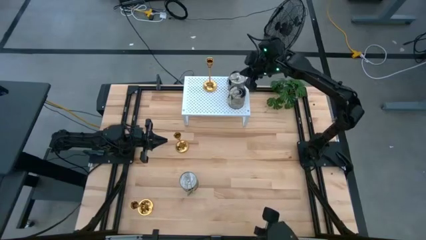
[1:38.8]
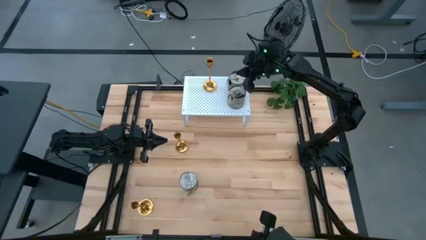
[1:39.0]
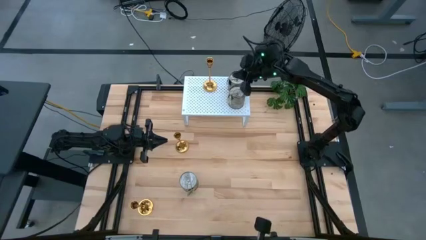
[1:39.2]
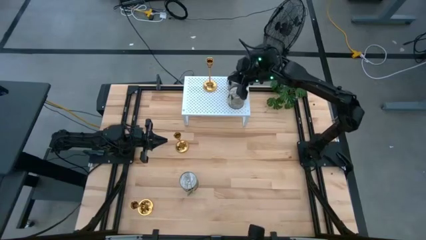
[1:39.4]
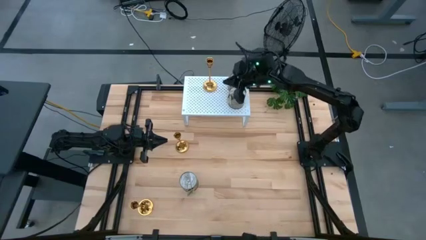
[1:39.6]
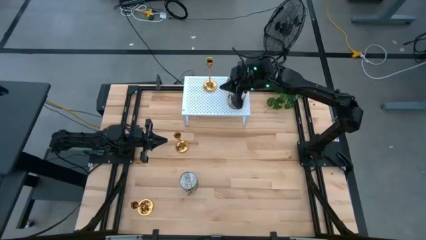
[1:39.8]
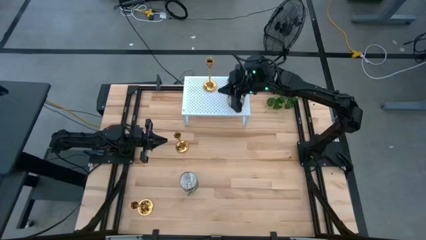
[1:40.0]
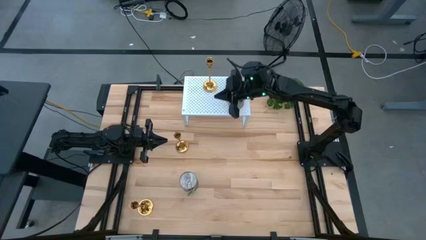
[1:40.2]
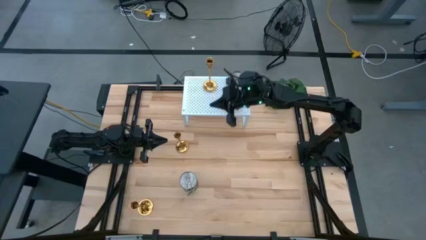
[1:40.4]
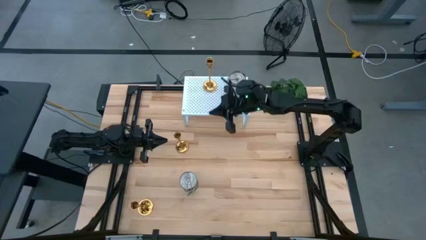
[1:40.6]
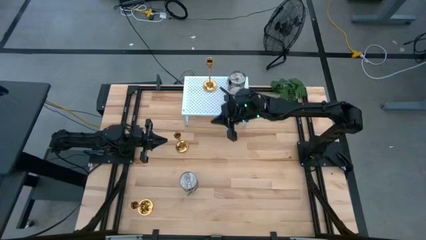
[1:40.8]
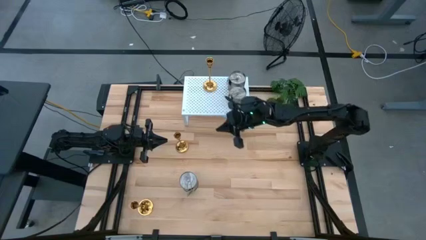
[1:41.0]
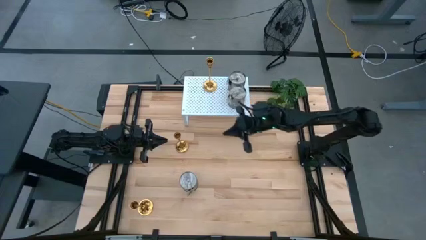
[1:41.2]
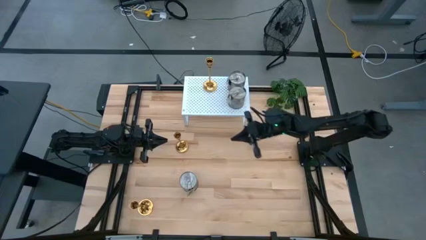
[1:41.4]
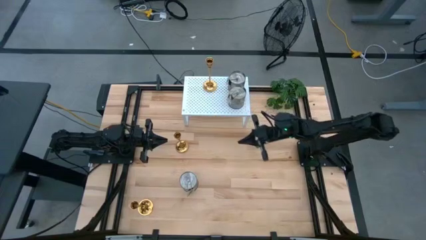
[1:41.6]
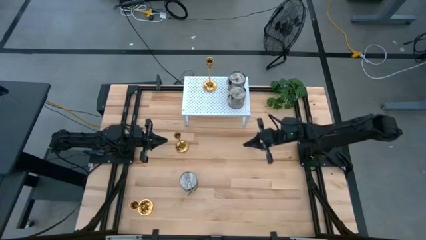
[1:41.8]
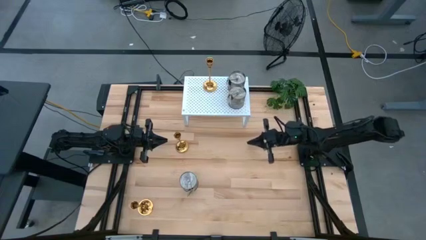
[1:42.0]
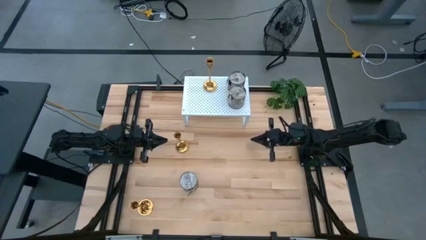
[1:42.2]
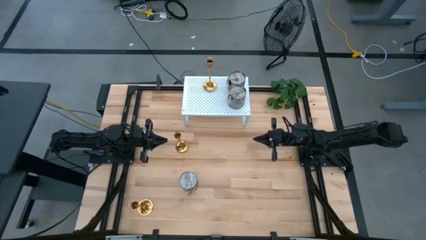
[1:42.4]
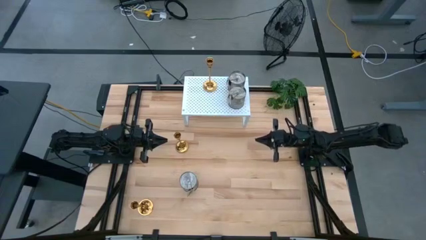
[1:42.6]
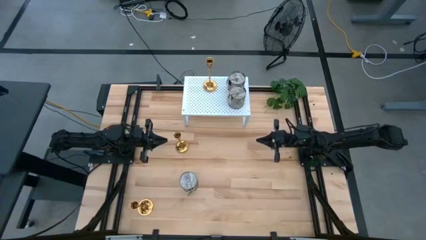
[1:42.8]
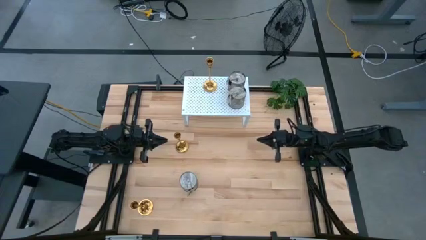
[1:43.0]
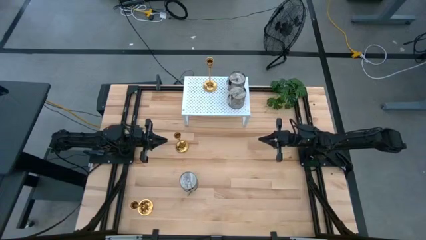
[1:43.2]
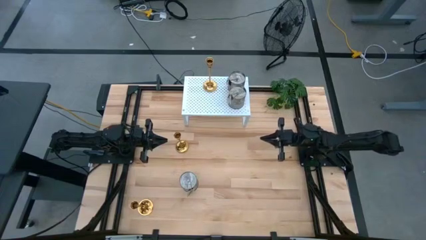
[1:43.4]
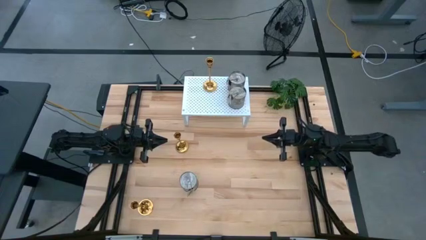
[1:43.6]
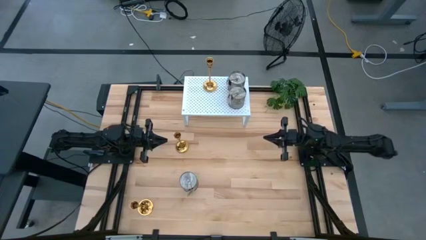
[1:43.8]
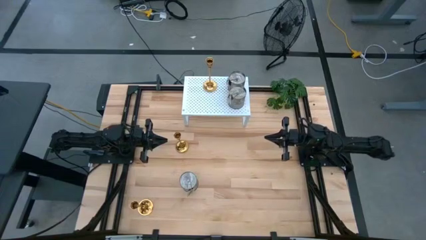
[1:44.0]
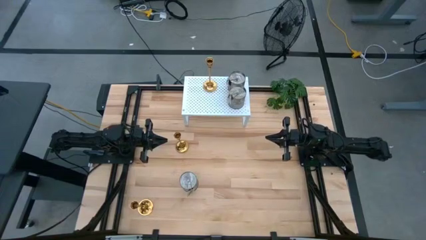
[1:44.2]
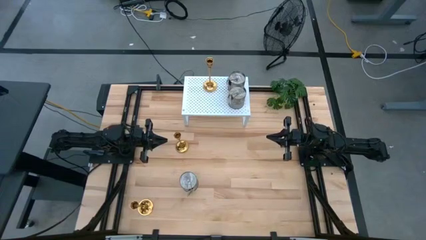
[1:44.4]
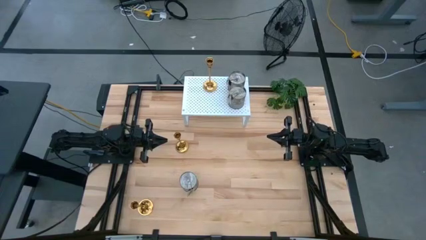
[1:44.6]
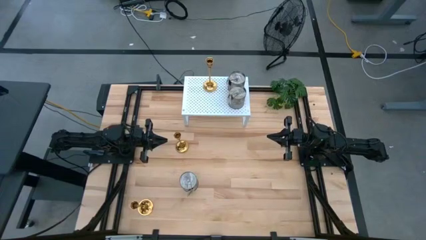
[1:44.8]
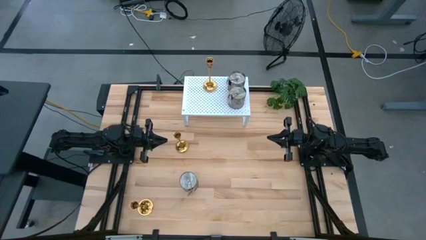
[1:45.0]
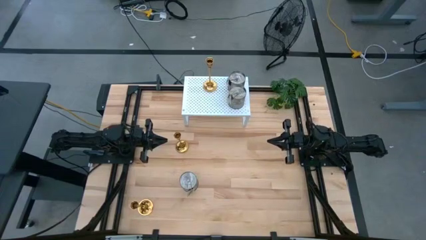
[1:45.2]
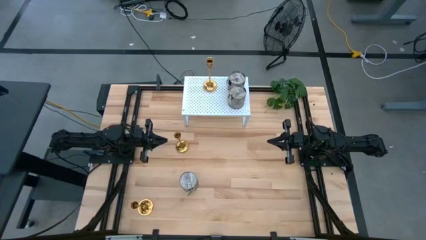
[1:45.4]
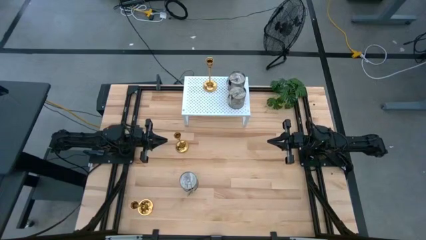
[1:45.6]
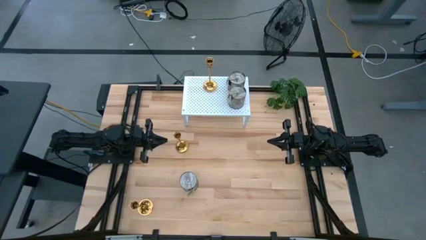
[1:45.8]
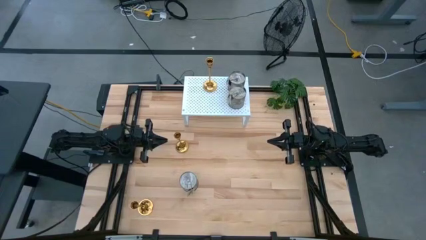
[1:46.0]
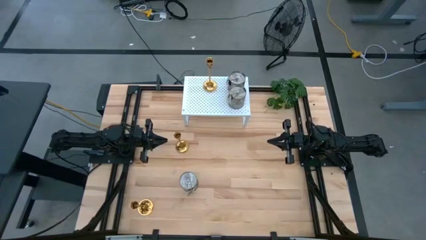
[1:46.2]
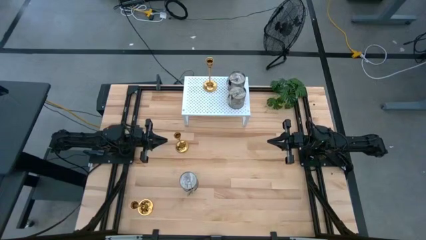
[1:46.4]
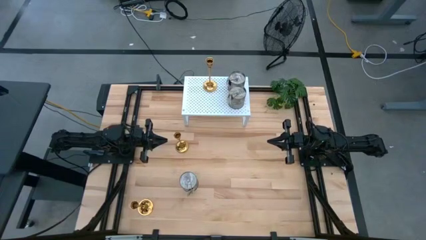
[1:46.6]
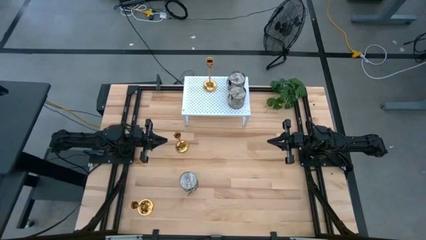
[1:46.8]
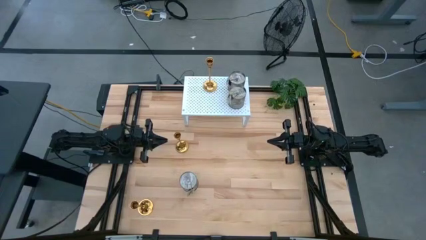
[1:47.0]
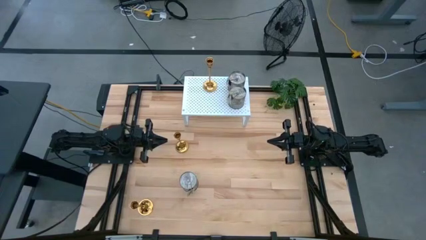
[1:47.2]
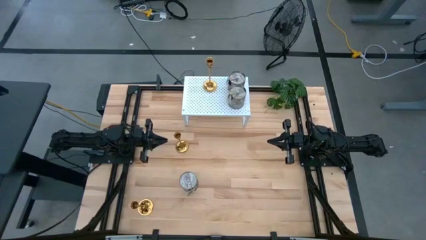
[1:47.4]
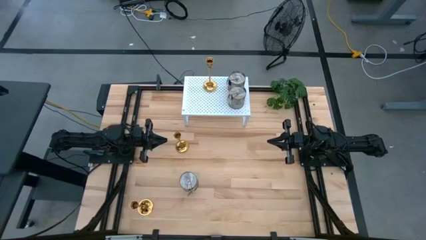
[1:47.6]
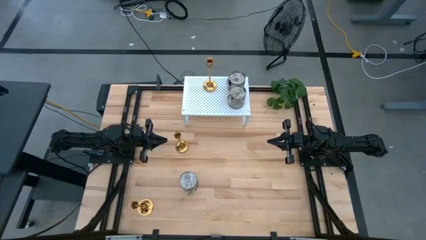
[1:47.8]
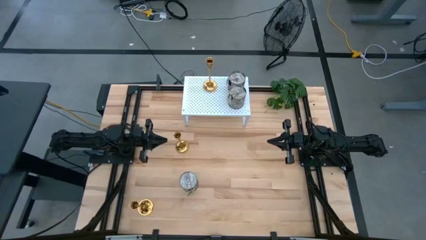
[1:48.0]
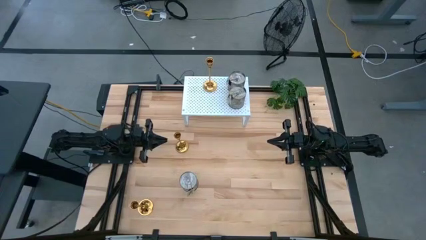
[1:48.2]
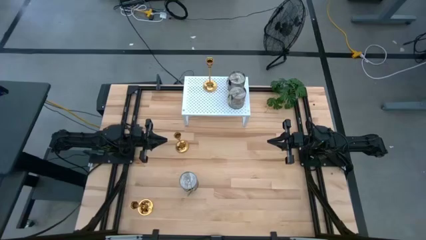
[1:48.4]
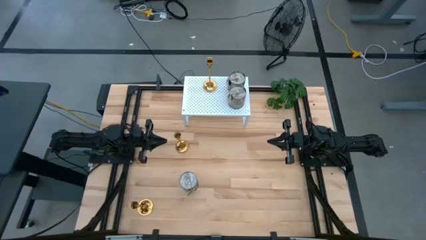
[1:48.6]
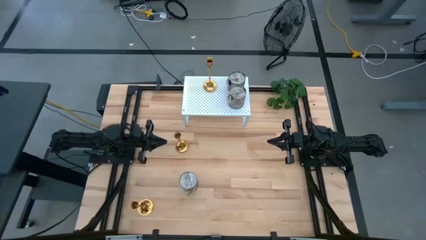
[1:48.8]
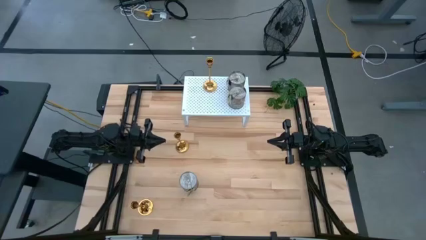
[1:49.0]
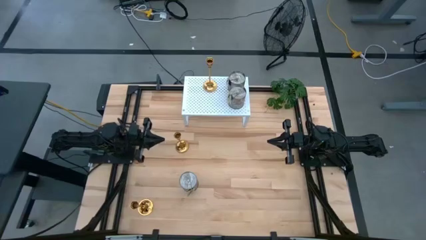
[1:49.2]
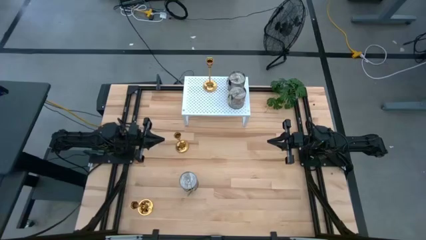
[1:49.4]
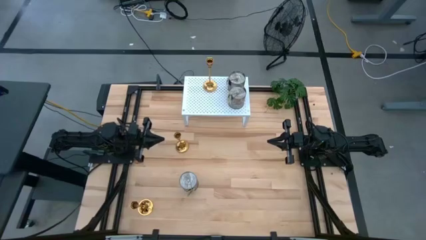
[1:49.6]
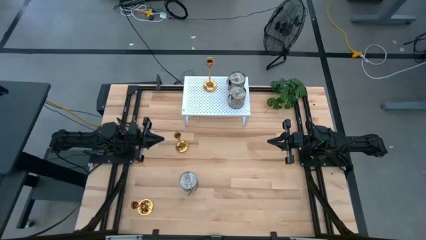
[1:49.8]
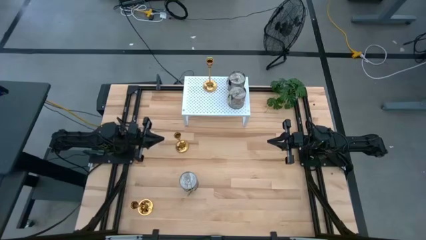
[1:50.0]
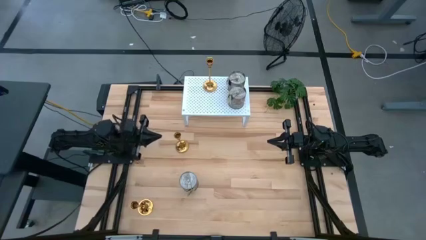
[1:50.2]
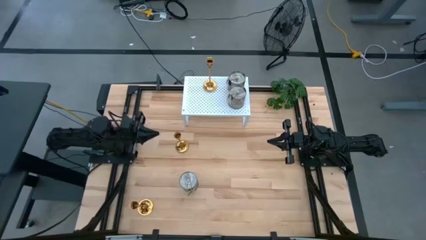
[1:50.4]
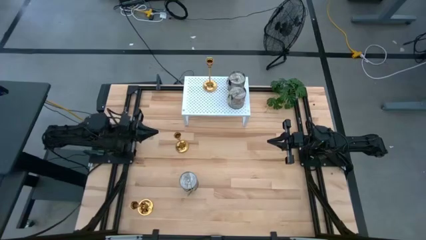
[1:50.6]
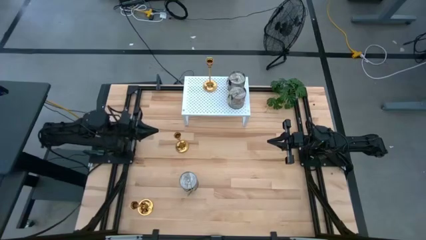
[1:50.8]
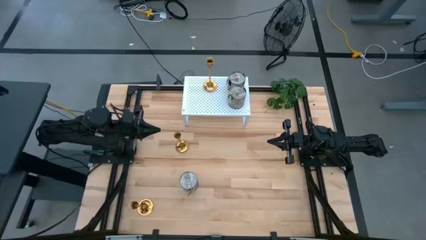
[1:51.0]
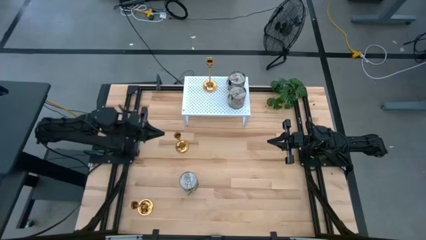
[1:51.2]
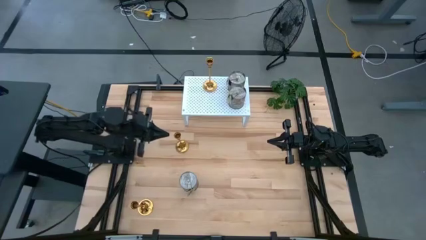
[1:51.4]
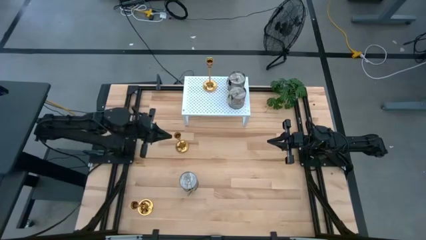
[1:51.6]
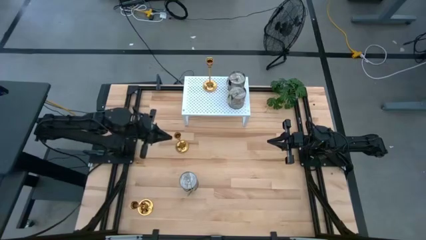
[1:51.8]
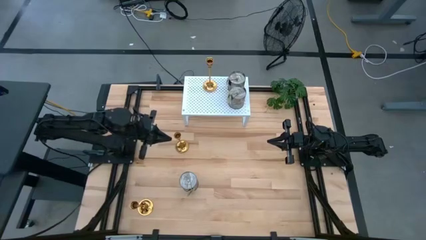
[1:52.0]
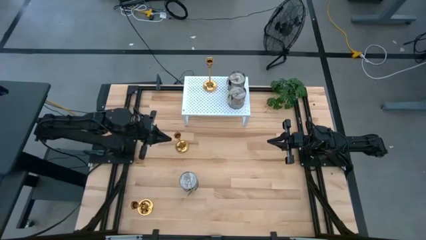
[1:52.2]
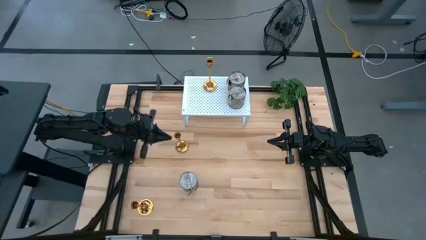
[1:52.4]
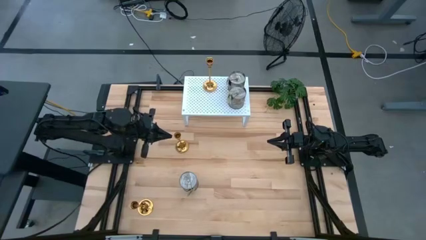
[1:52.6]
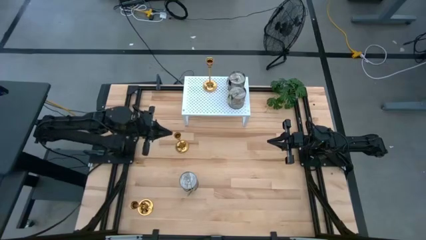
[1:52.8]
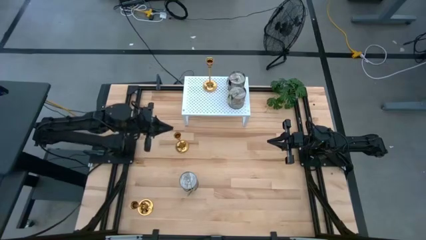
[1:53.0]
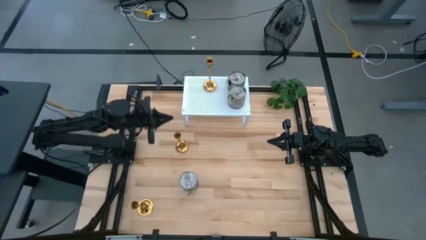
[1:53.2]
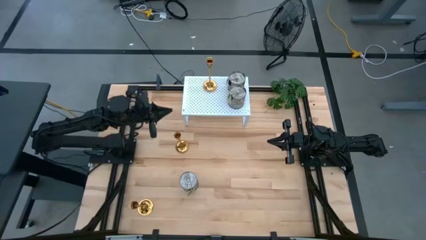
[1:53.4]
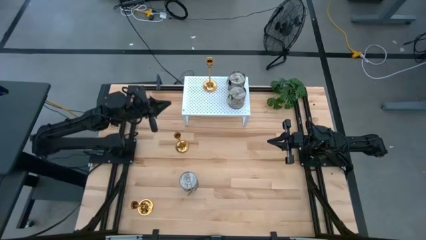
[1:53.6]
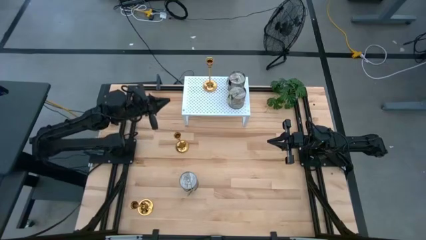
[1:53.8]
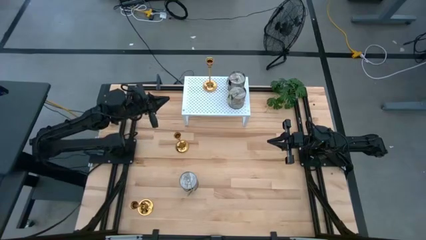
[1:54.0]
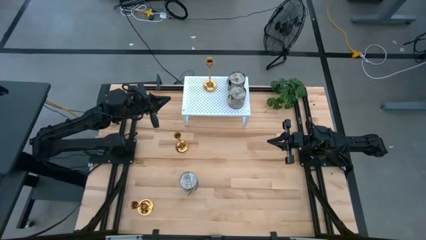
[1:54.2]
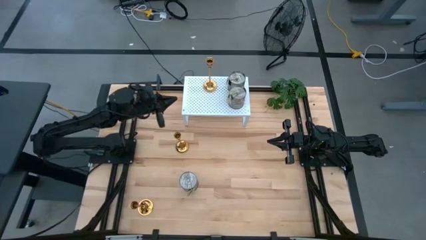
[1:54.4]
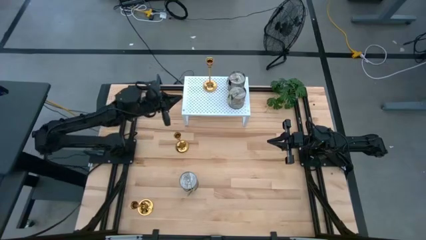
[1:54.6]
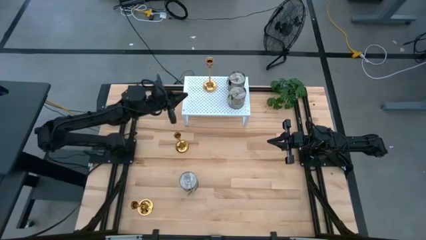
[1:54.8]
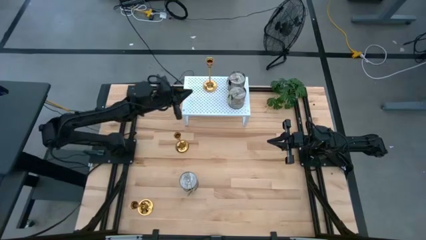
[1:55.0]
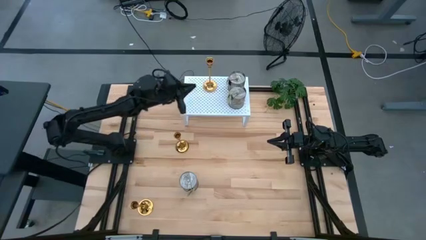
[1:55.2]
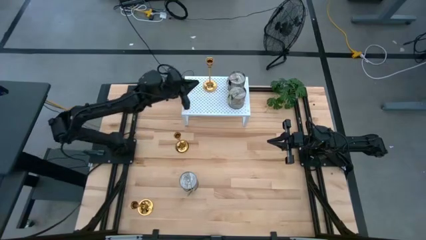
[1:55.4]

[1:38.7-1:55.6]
Task: Pick & Place candle stick holders
Adjust the candle holder on the shelf
